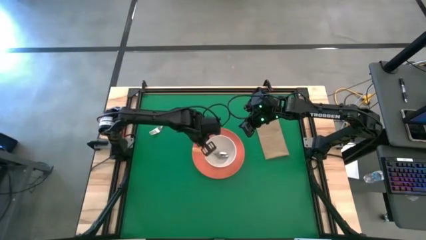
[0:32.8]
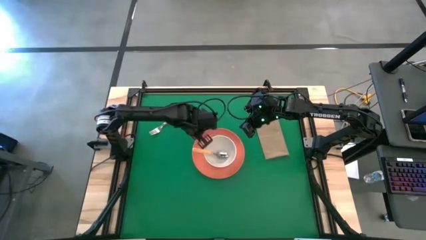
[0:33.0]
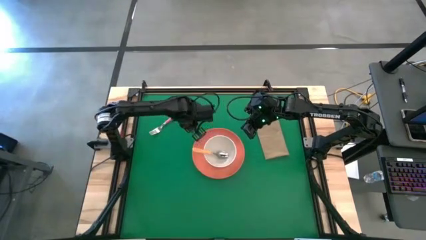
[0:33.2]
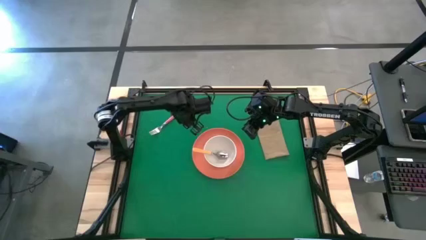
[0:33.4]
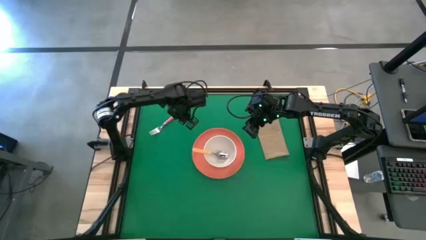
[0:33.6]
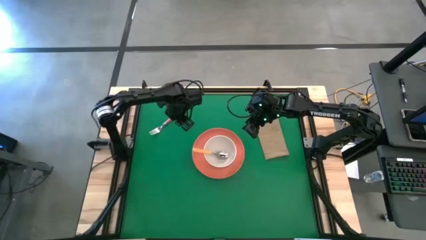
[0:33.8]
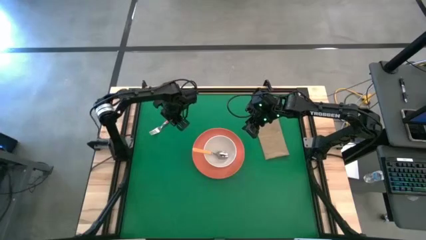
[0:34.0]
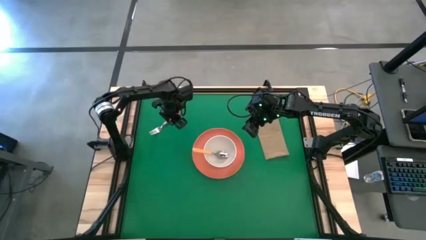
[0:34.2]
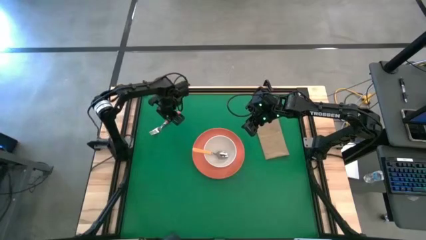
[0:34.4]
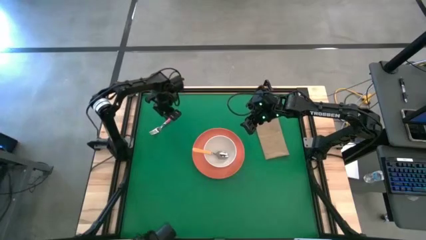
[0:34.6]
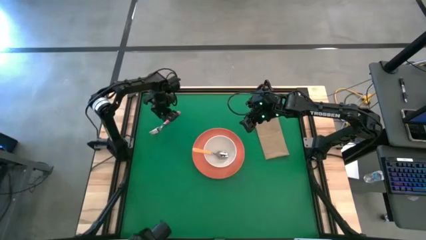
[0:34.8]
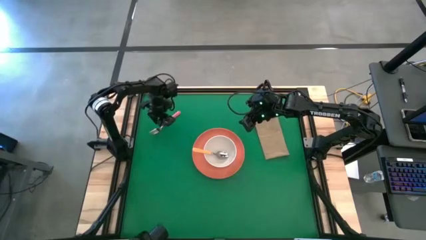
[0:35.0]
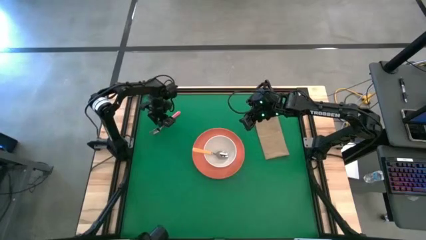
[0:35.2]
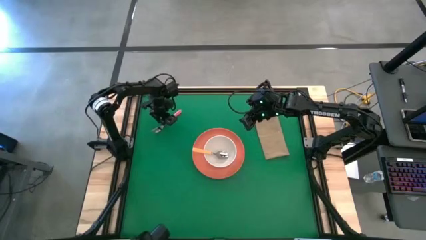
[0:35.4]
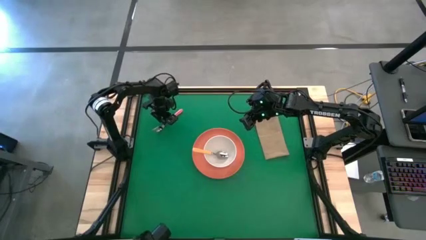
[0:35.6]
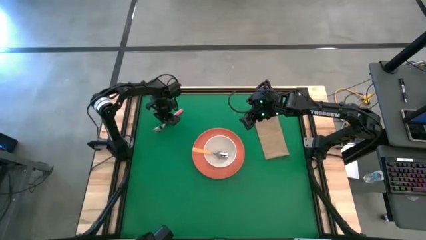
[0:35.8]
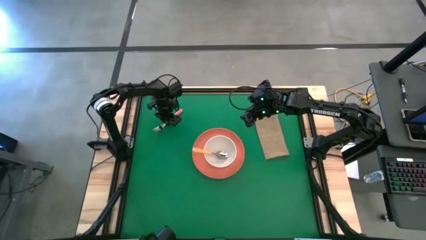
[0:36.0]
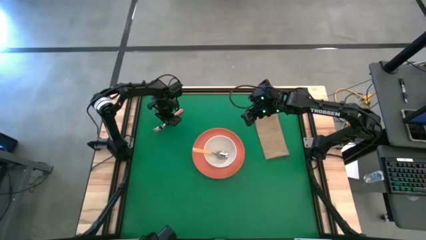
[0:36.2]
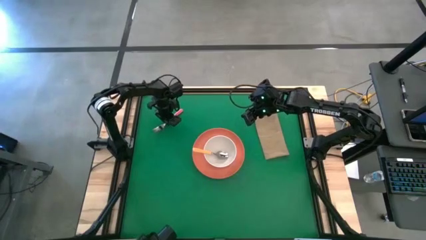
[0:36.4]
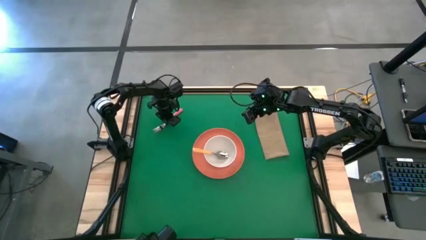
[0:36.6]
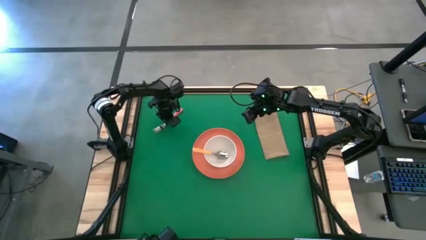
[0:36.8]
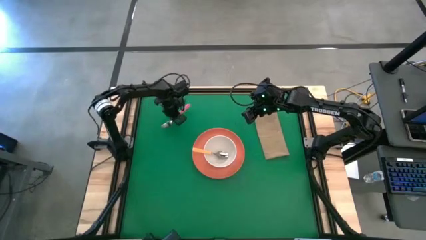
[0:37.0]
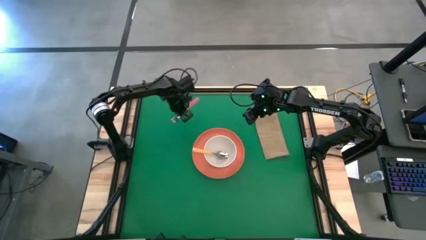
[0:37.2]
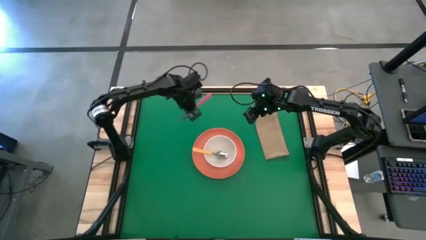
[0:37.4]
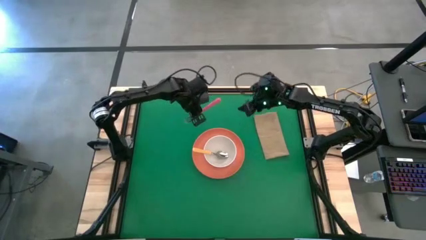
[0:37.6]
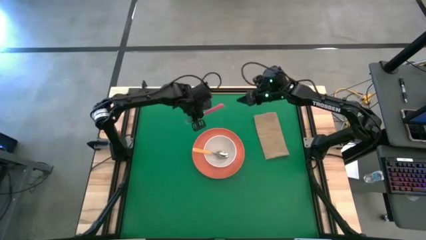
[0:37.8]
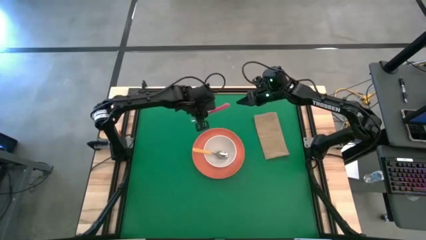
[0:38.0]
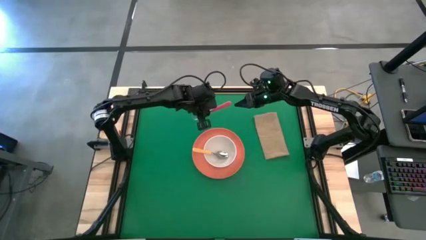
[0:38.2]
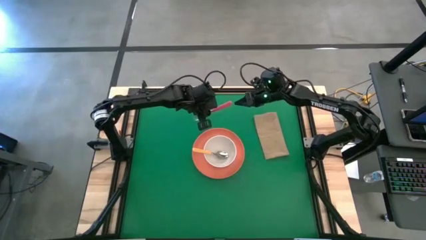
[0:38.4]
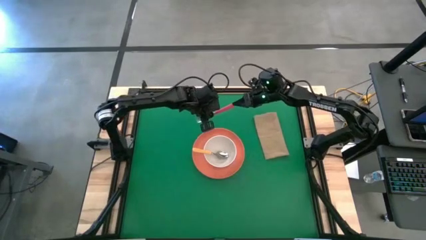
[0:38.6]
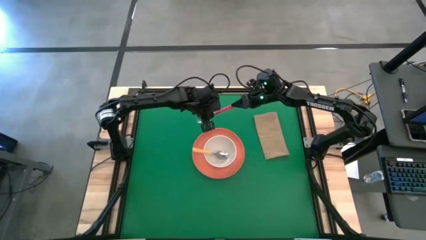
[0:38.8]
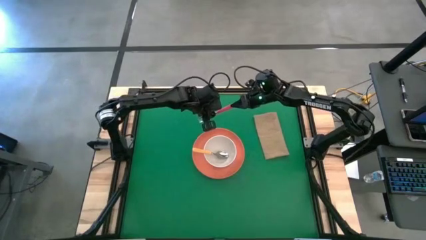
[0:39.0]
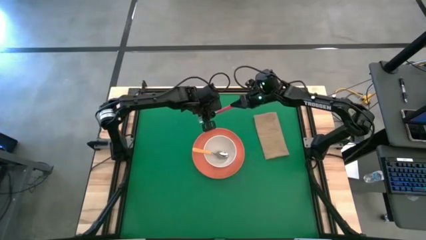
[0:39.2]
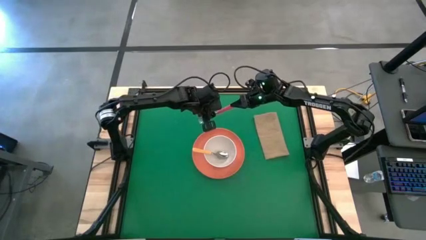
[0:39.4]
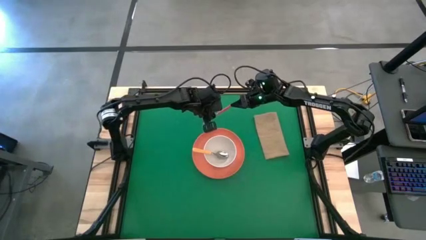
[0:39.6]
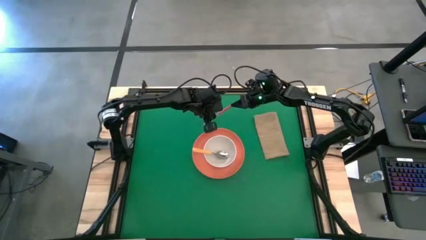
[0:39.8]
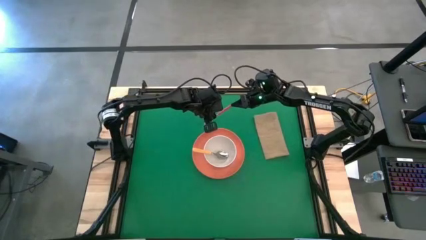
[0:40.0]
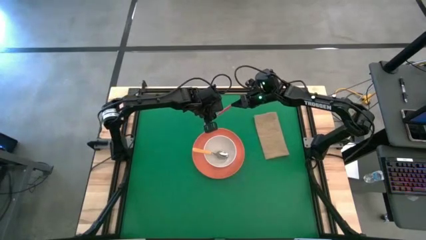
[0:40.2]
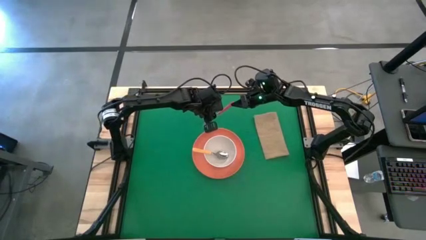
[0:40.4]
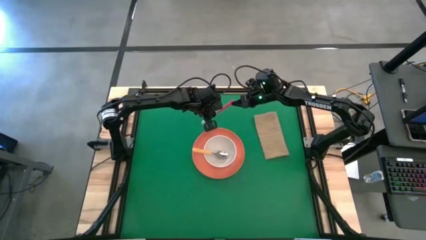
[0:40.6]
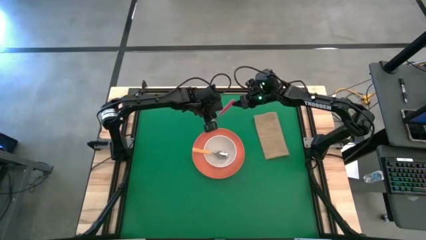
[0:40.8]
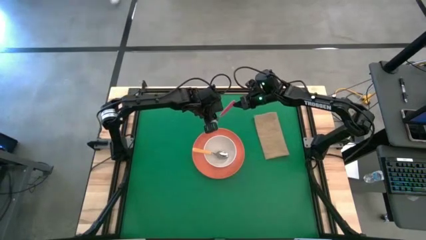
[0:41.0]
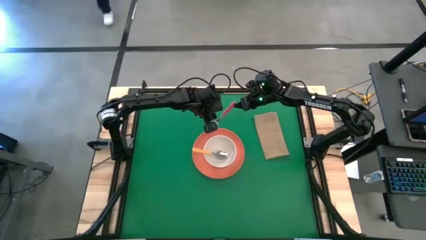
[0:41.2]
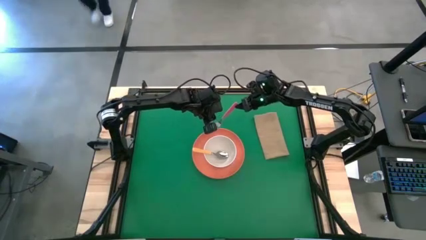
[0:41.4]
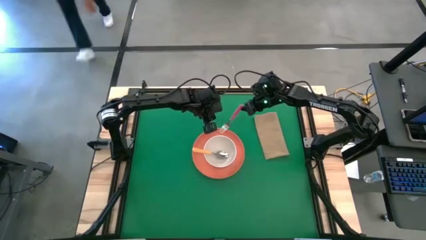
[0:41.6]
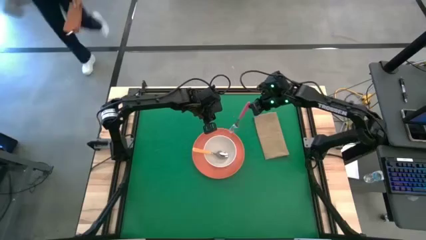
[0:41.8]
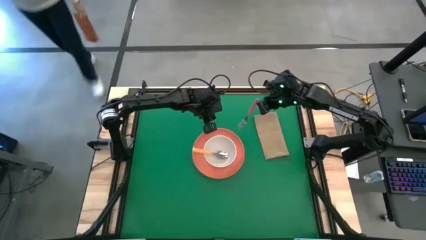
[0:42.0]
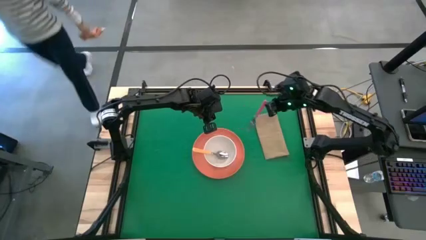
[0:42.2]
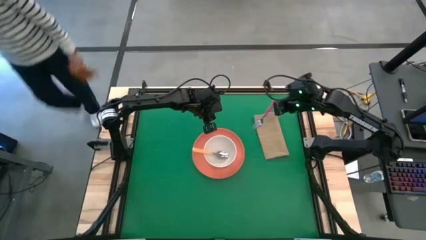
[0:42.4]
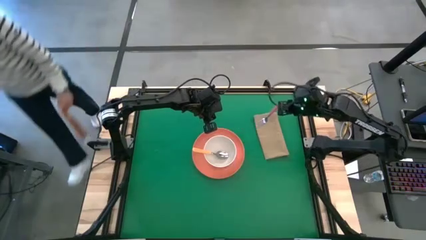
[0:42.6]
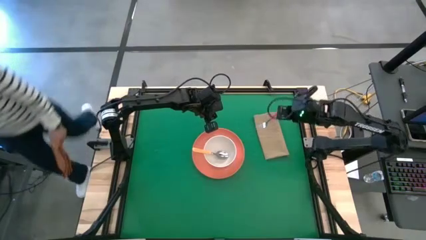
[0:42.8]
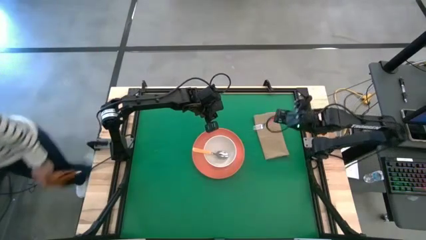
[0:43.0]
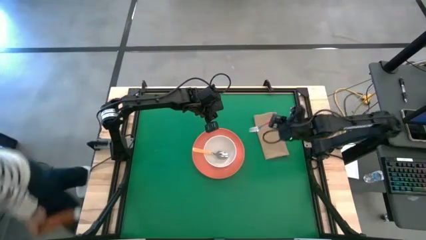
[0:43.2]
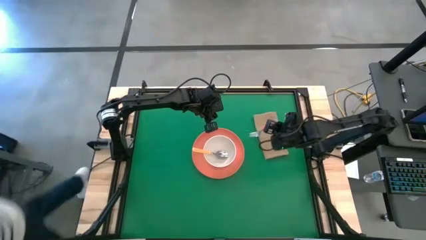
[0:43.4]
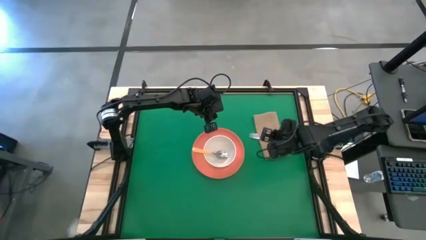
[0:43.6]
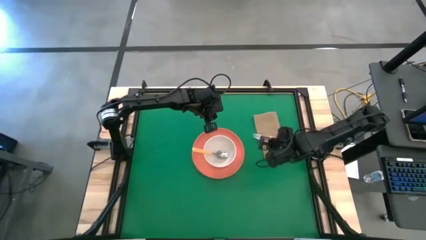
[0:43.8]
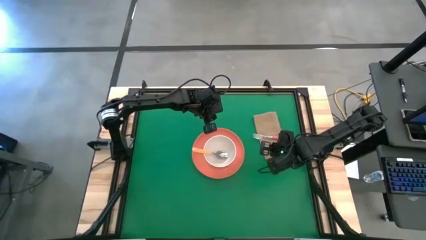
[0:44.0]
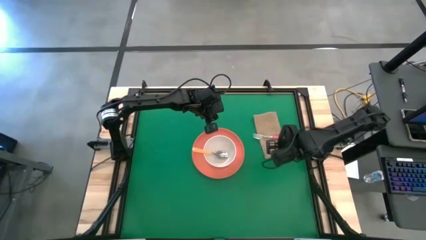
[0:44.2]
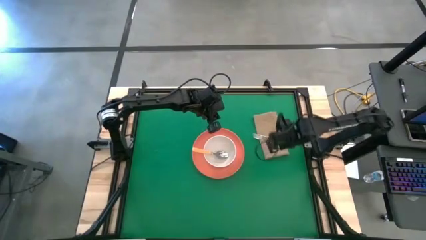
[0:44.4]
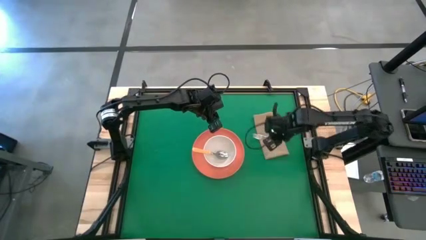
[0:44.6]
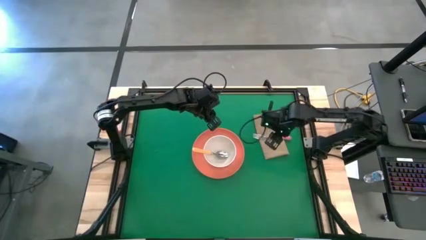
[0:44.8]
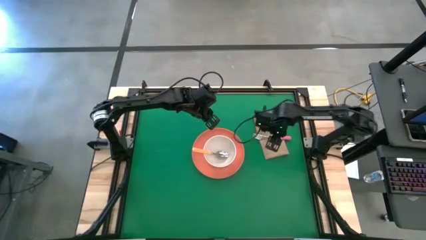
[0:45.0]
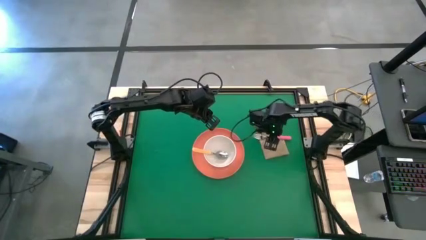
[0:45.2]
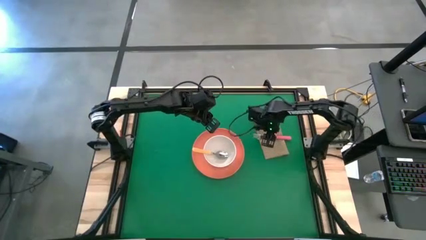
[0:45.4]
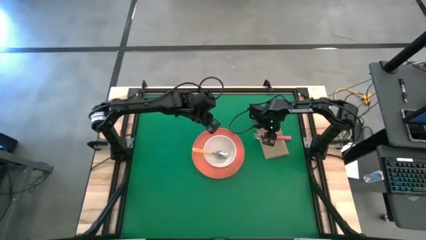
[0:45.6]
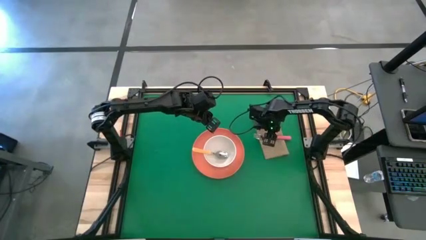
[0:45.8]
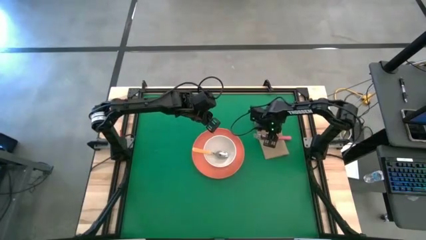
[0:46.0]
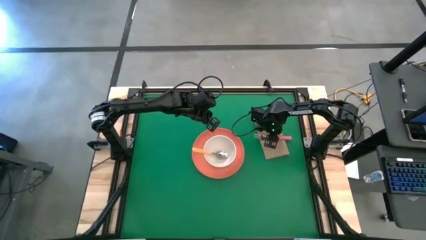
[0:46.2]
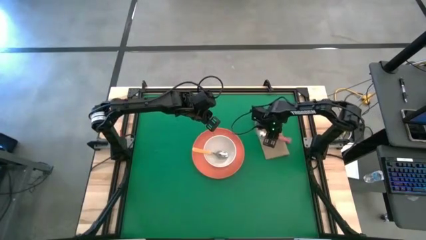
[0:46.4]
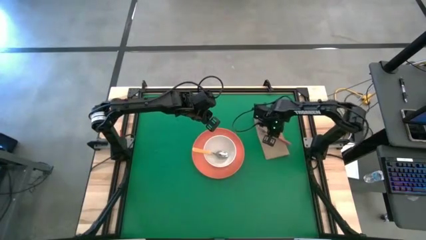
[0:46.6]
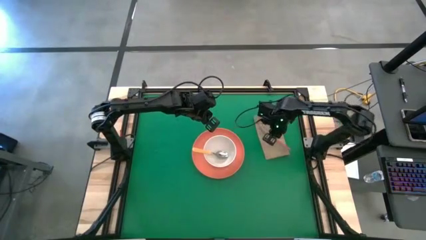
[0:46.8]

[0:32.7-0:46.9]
Task: Set table place
Put the pink fork to the right of the orange plate

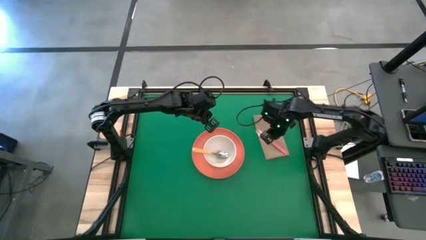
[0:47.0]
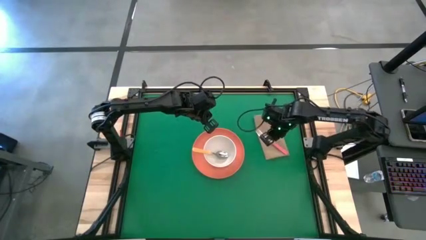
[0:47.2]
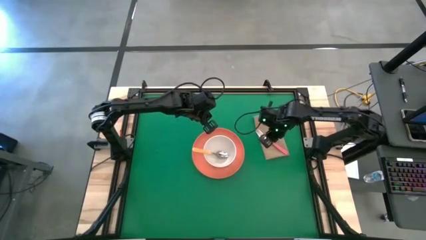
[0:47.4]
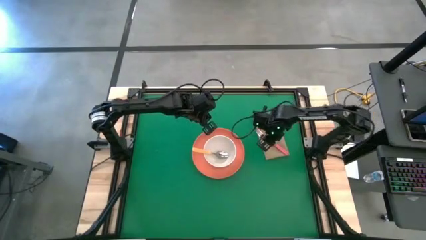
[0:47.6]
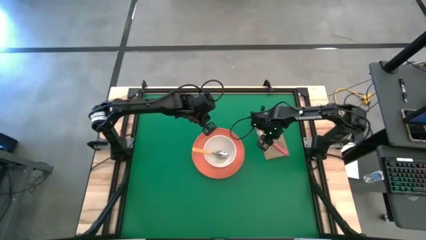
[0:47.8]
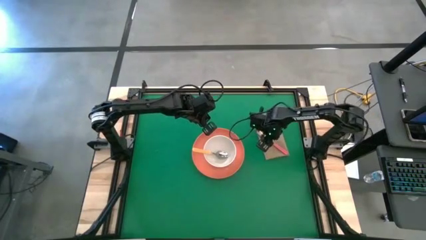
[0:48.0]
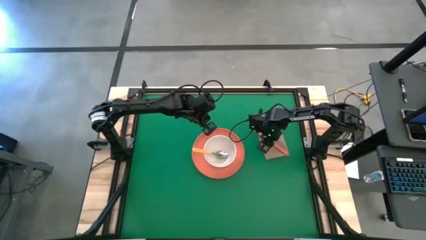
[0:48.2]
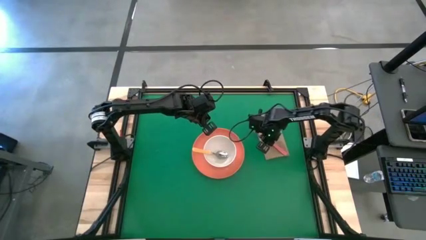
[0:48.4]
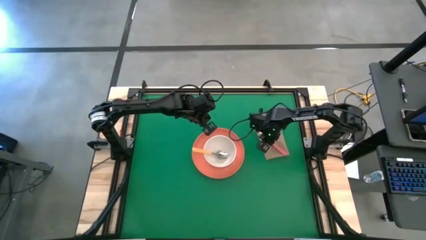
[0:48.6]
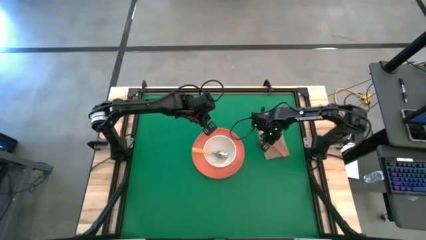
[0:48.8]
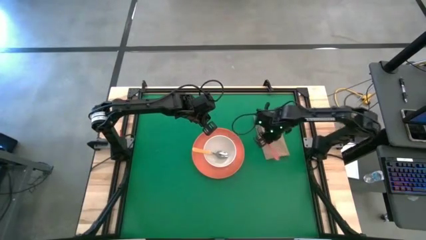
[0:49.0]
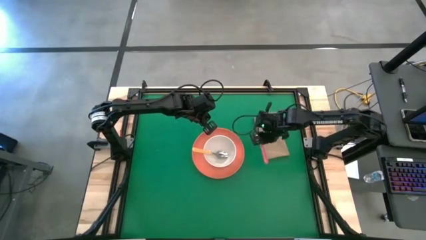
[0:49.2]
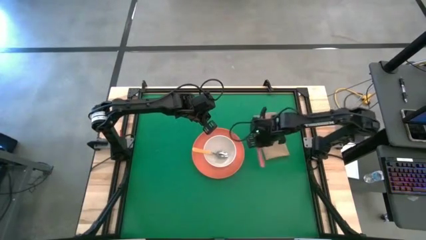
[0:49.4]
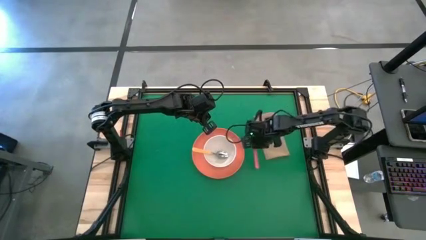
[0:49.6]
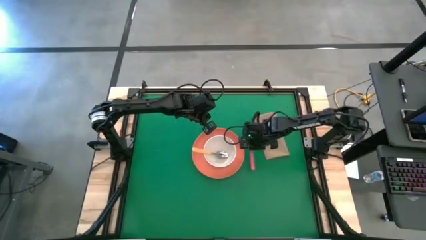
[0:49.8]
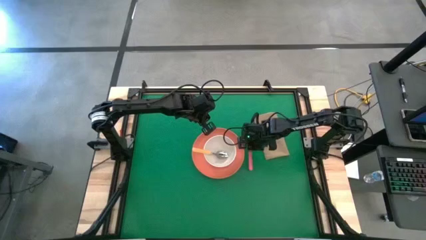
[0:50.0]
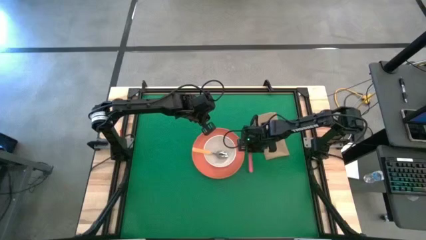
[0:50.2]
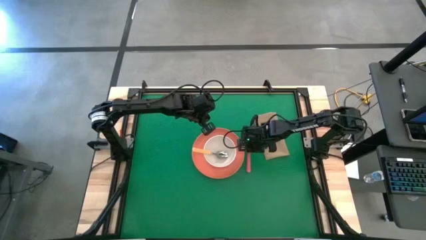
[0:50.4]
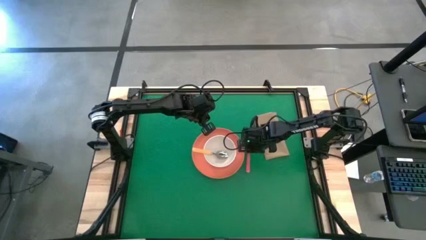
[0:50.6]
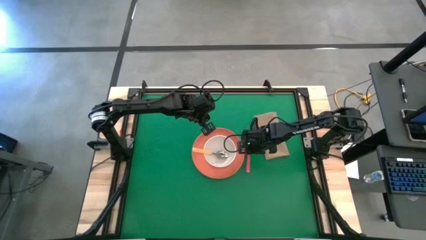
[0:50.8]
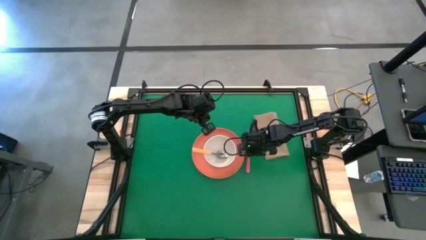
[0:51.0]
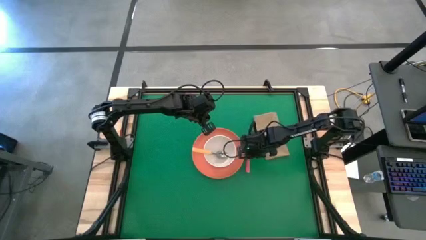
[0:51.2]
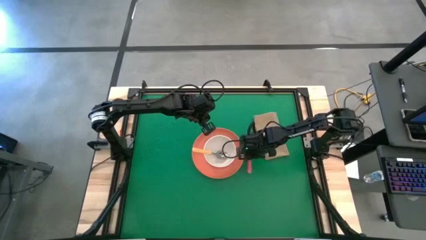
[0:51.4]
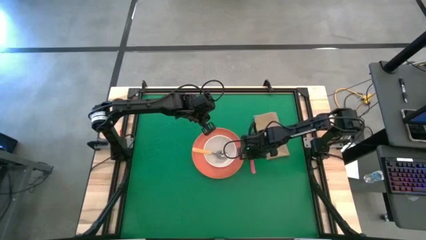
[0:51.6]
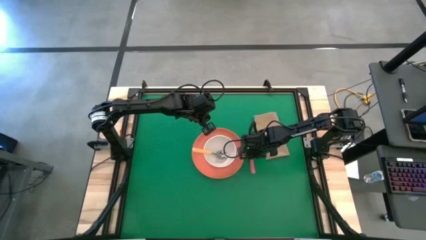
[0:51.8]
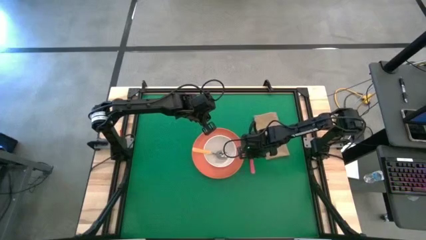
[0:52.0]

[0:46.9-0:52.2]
Put the pink fork to the right of the orange plate
